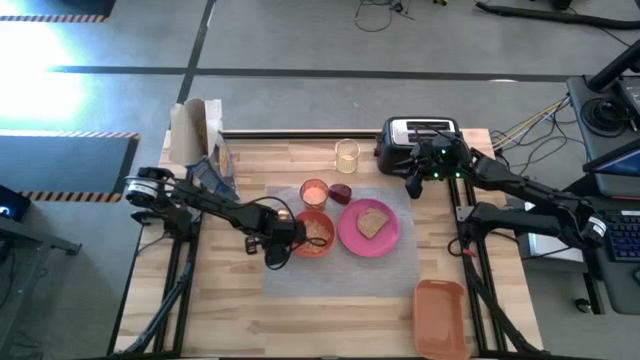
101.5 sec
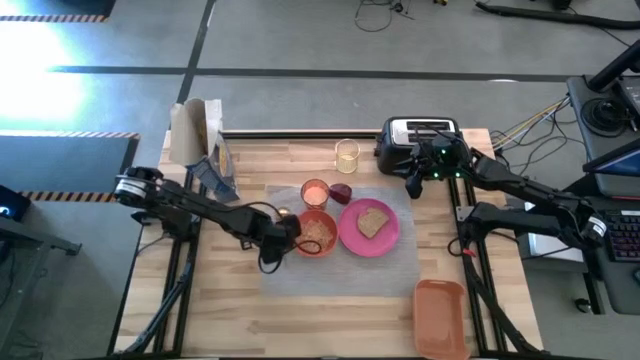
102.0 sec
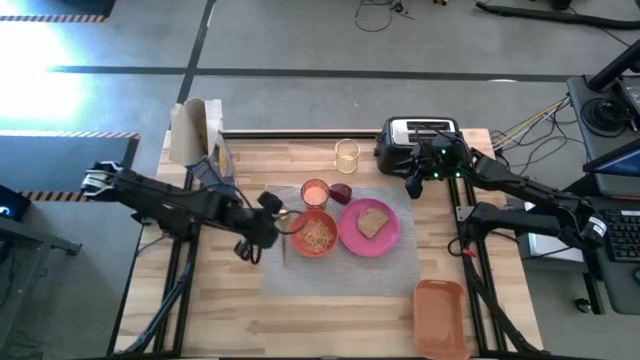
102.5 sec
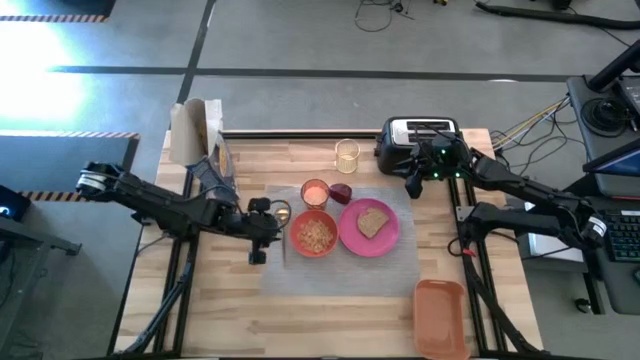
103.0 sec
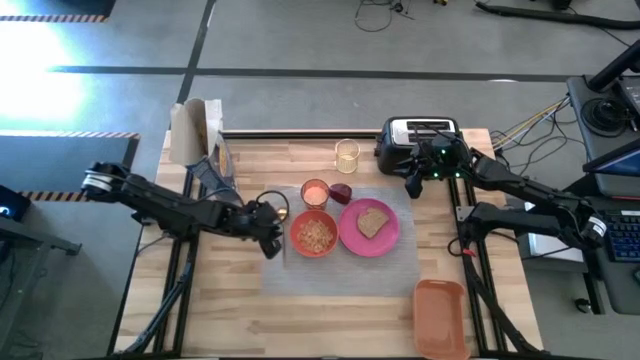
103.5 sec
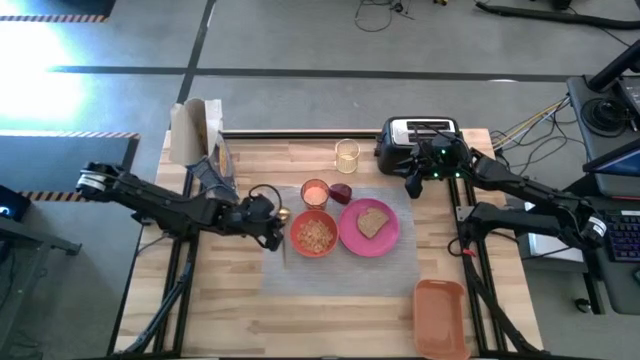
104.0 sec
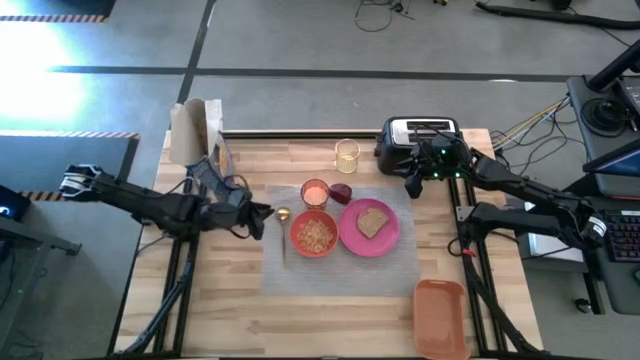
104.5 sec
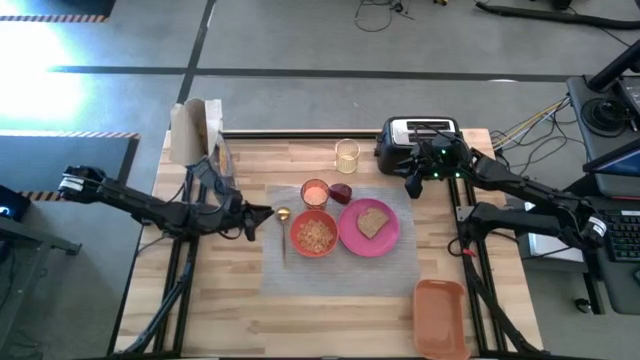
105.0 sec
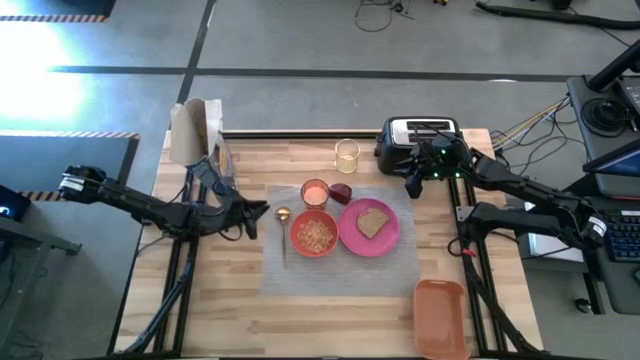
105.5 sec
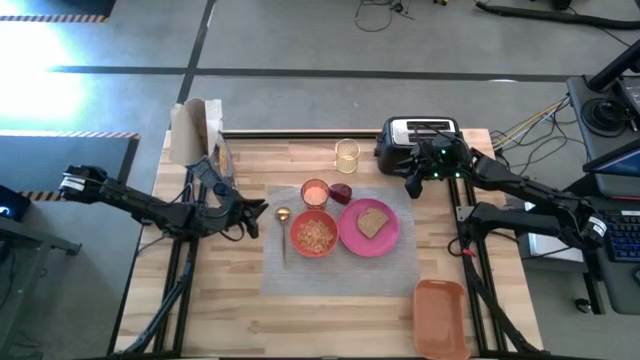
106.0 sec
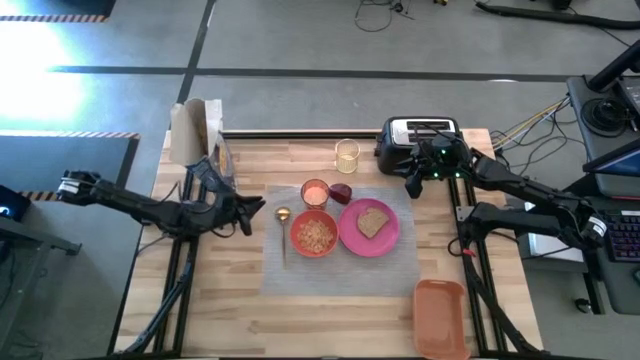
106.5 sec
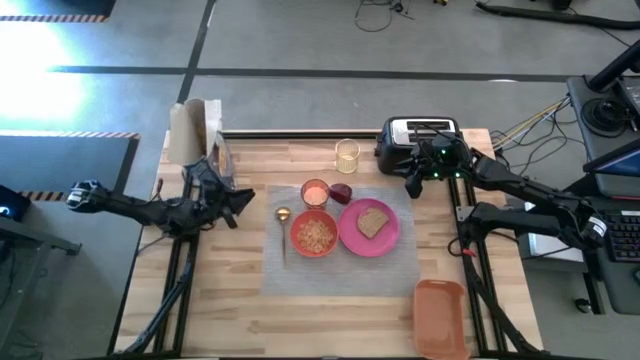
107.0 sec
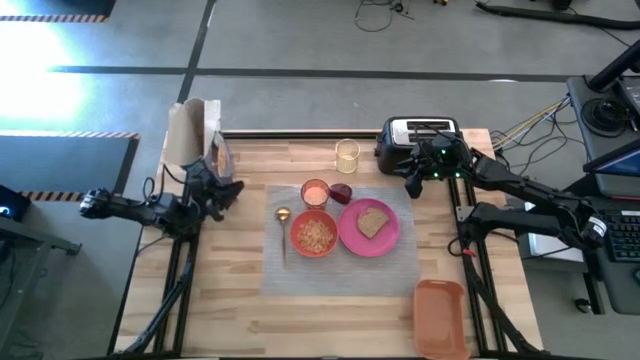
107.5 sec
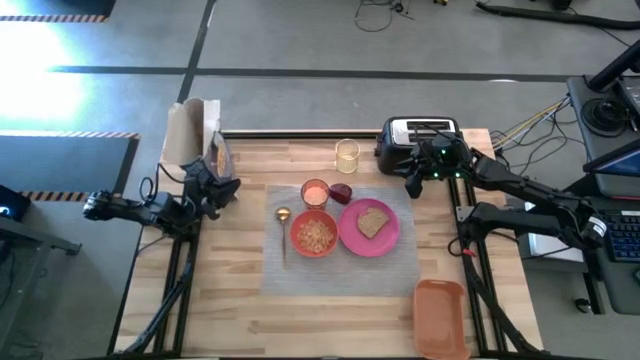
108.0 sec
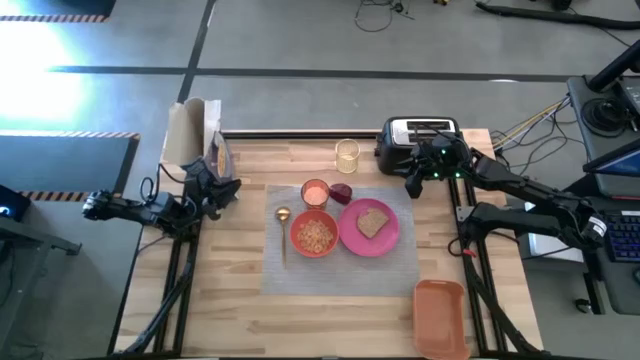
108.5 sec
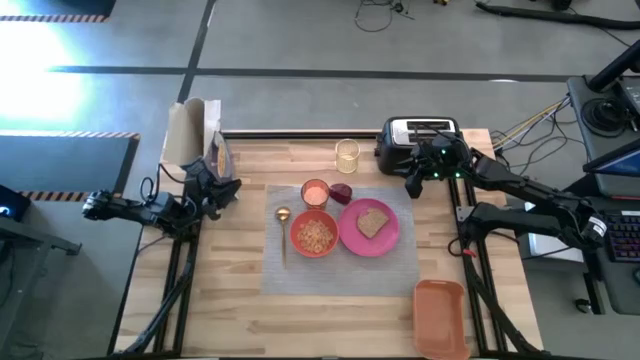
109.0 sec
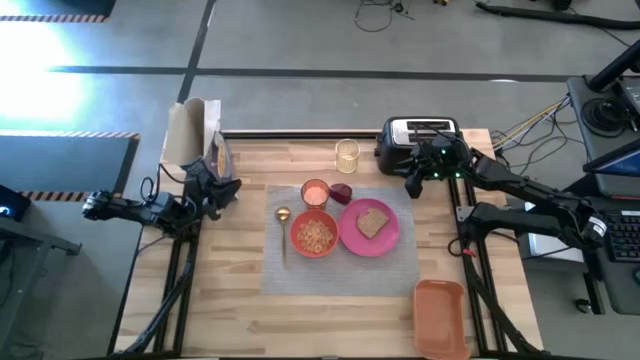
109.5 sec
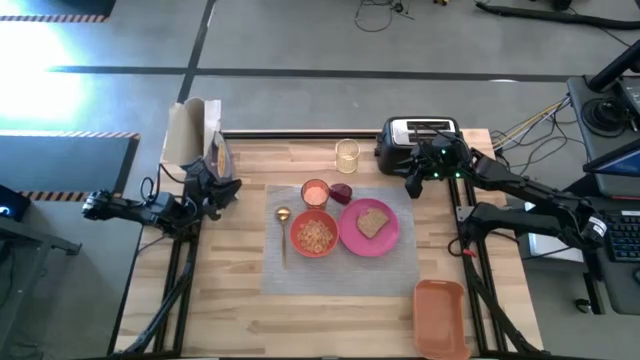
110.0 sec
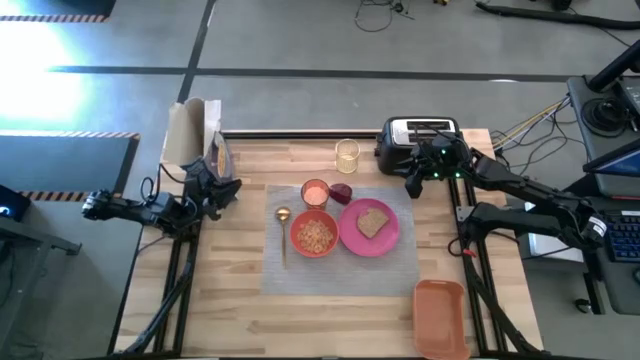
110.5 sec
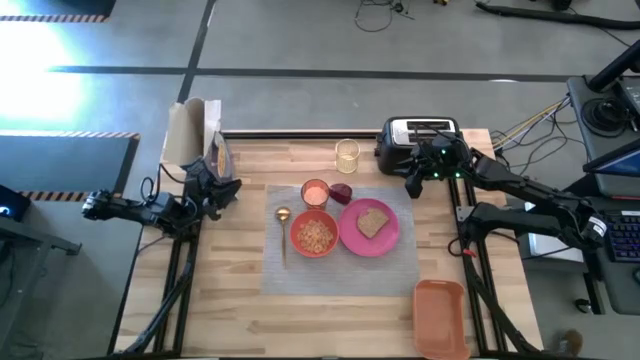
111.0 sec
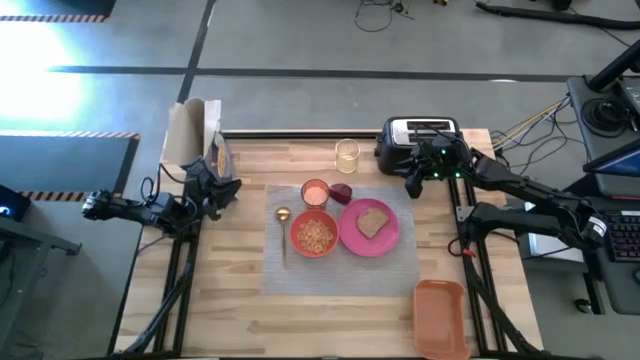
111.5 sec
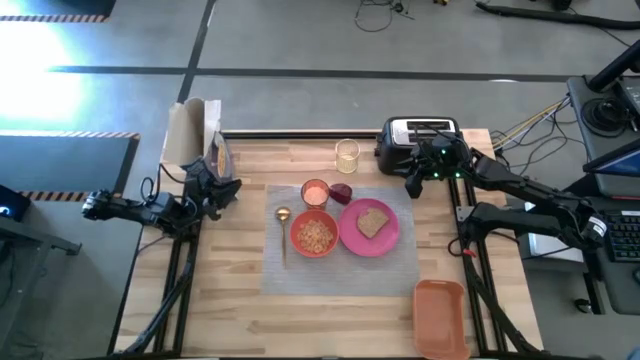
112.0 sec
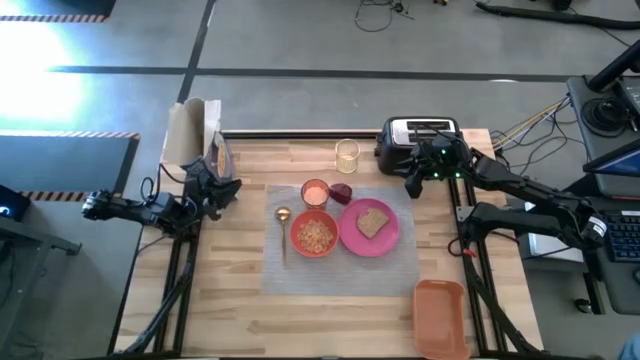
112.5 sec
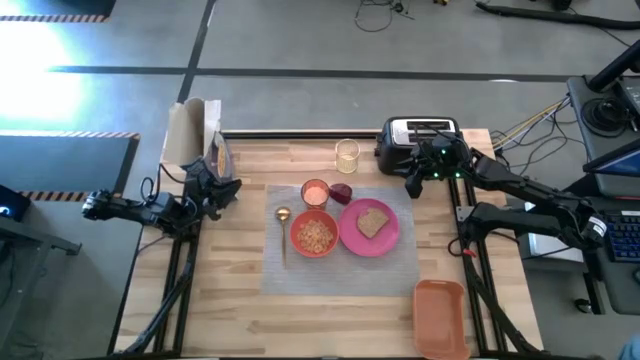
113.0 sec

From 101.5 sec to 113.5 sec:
Task: Arrange a breakfast setting
Return to Home Position

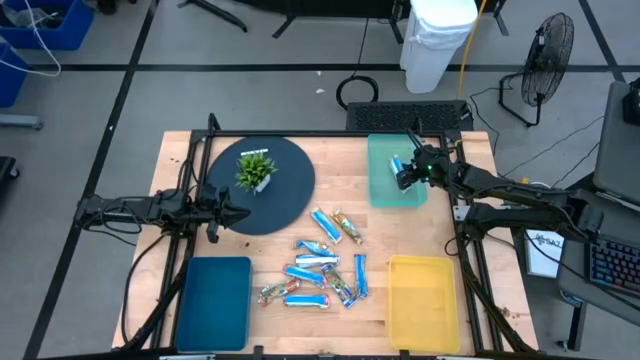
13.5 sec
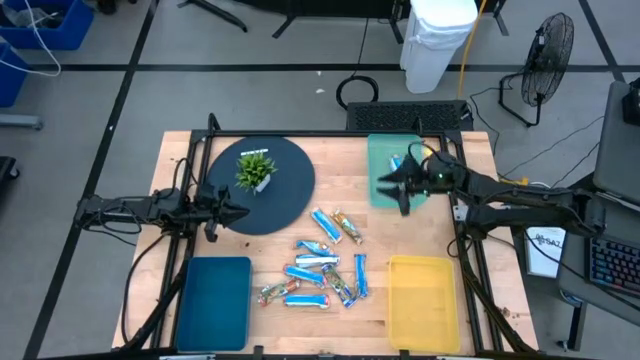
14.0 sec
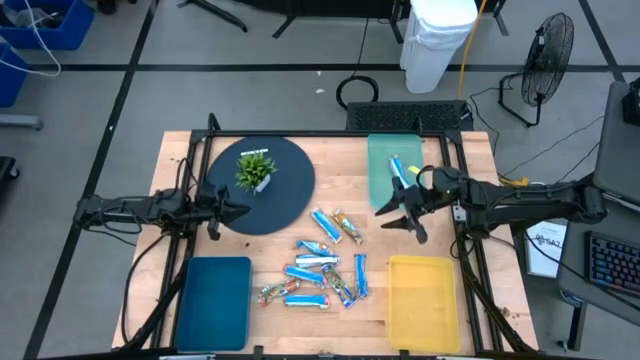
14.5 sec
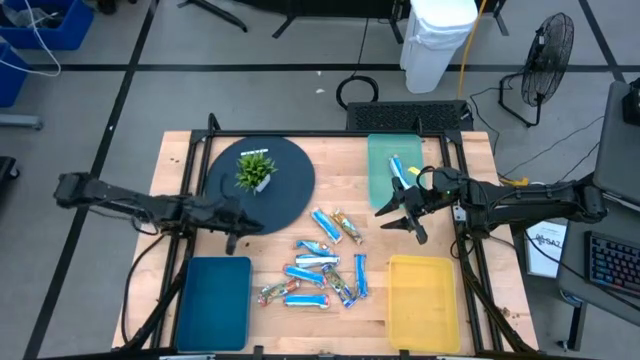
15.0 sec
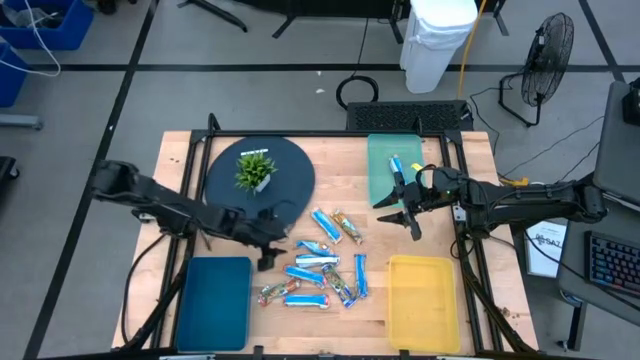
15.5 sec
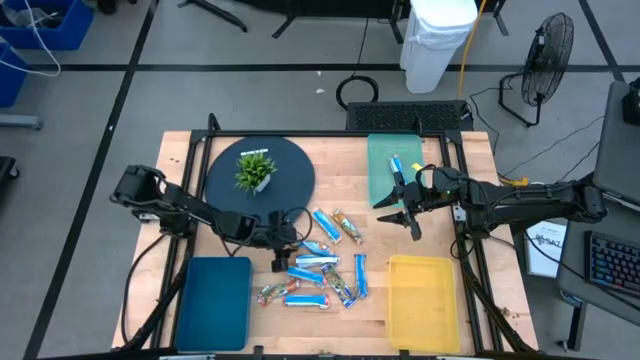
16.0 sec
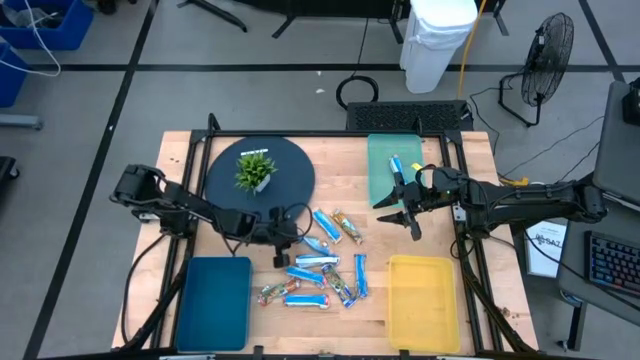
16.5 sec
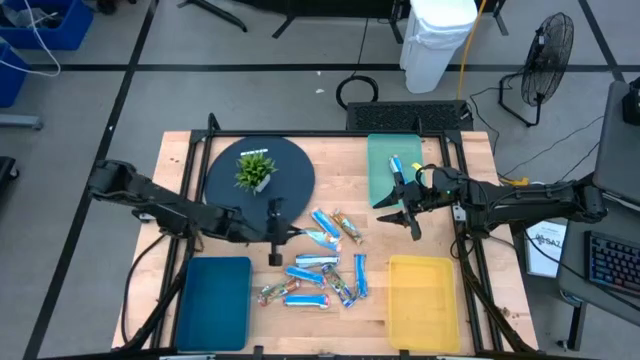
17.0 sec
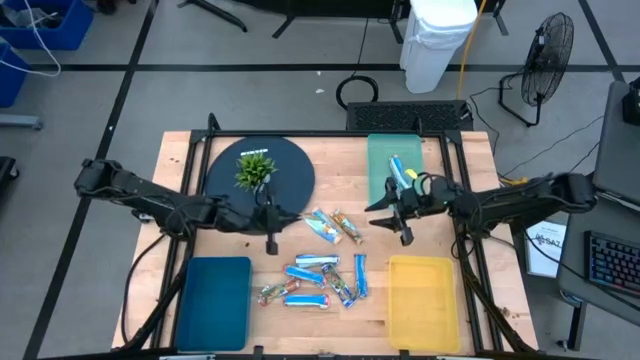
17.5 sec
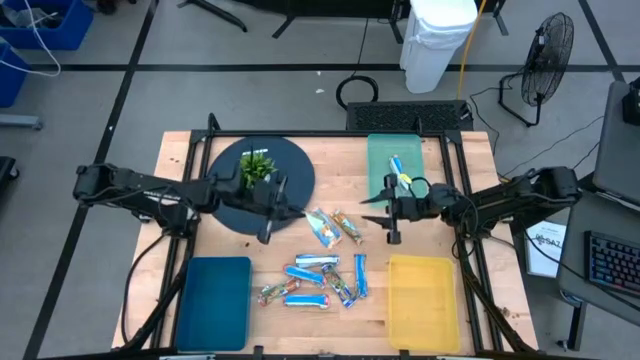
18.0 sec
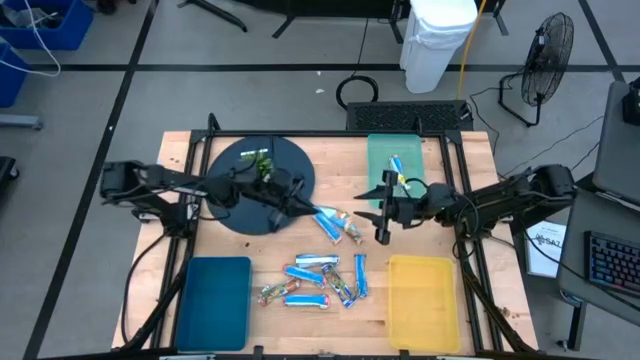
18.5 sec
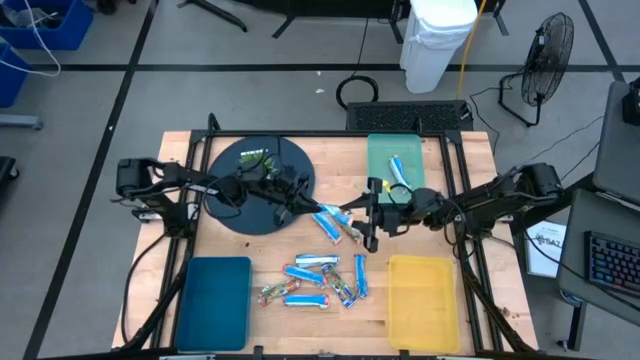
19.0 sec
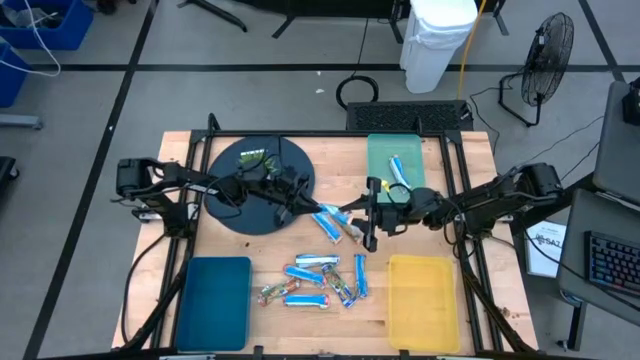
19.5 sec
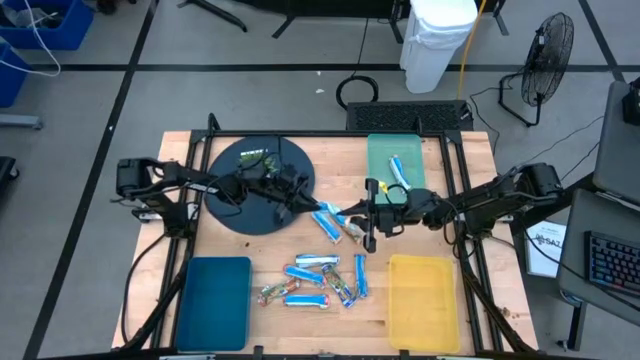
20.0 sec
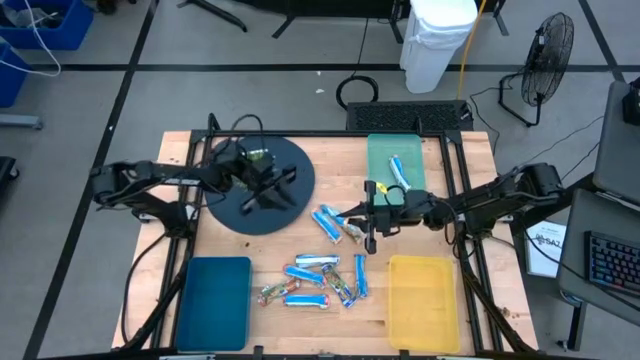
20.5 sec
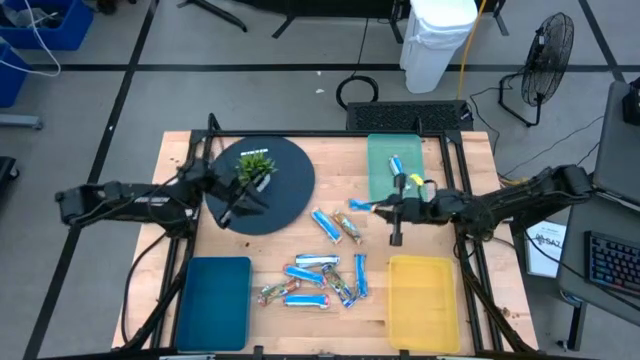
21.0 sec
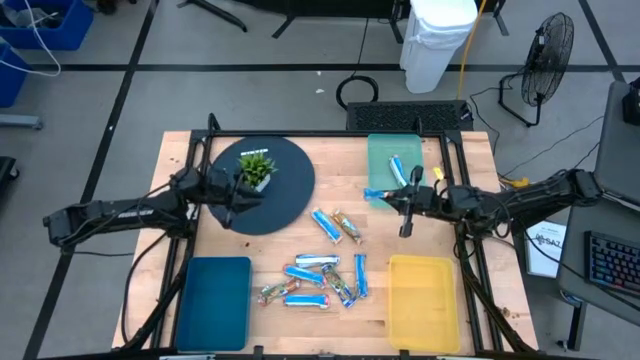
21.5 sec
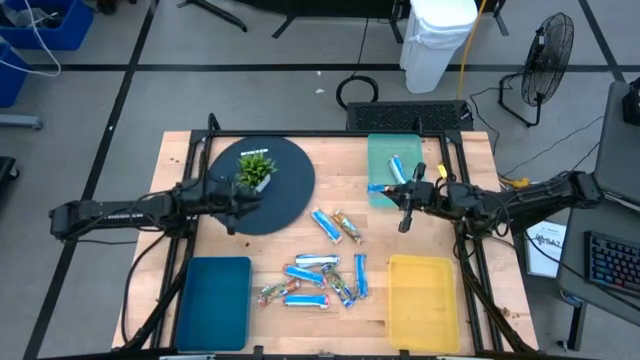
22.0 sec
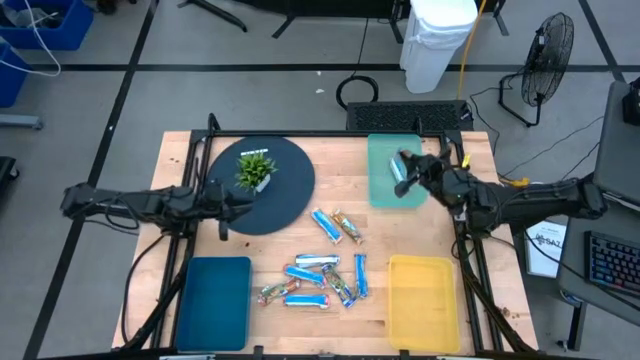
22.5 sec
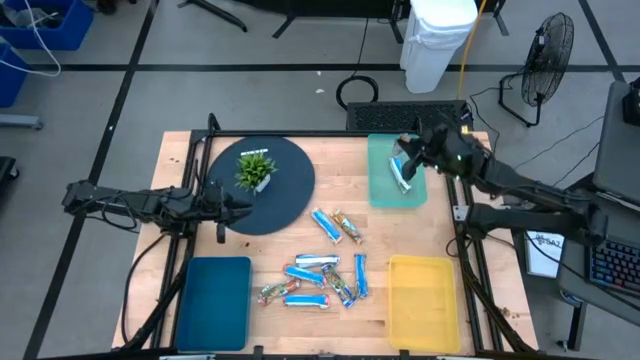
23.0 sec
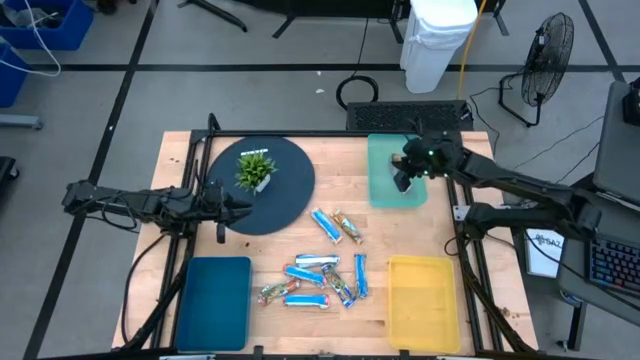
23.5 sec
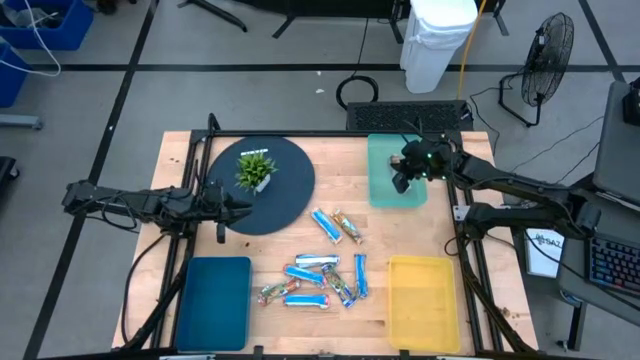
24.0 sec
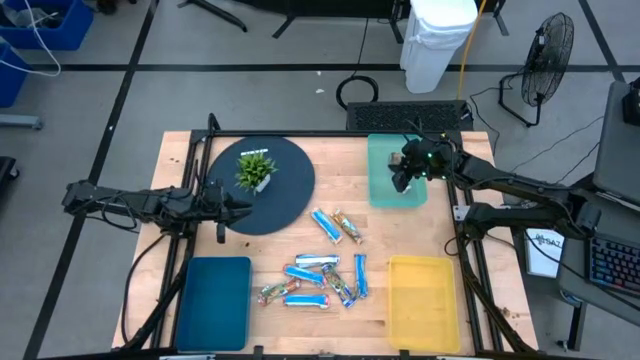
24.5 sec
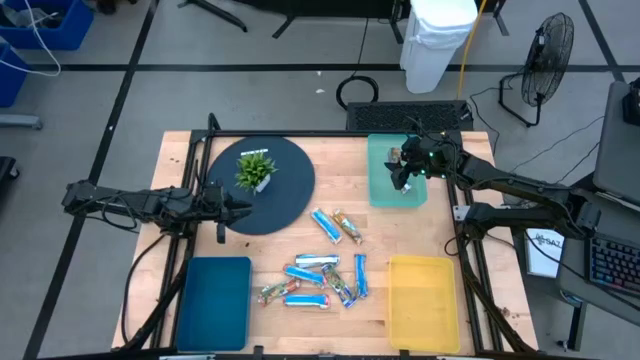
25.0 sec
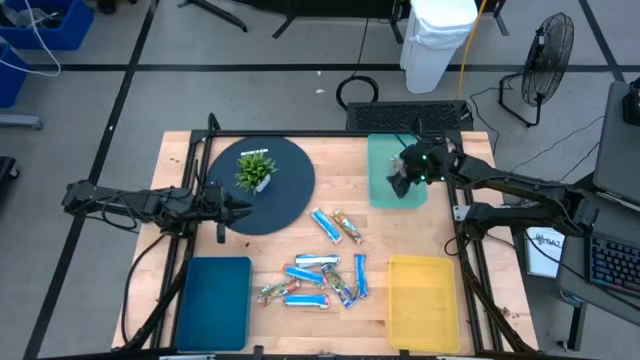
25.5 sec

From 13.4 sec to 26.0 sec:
Task: Pick and place Granola Bars by type
Put the yellow granola bar into the green bin
